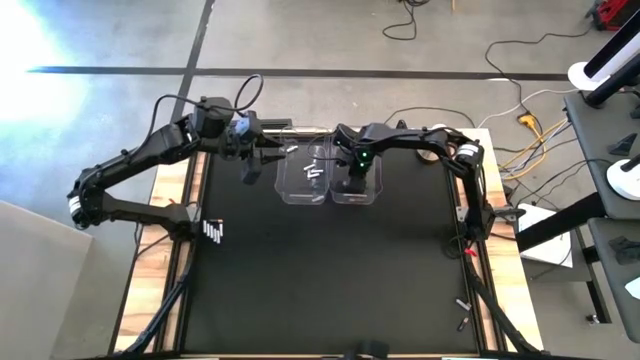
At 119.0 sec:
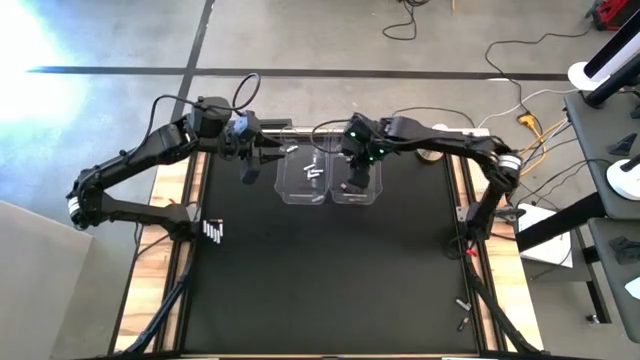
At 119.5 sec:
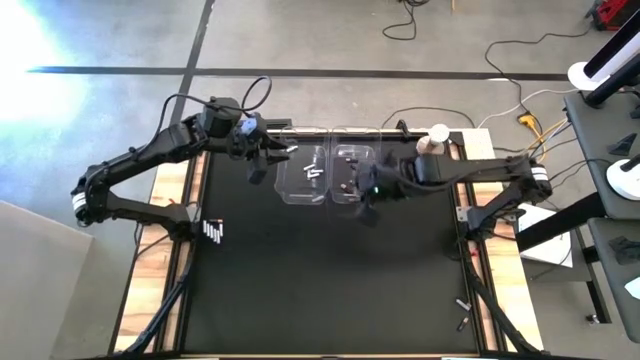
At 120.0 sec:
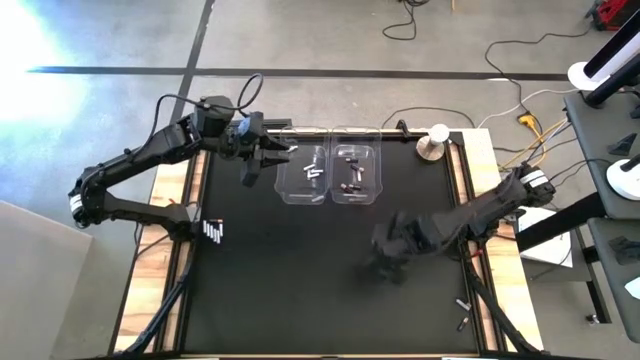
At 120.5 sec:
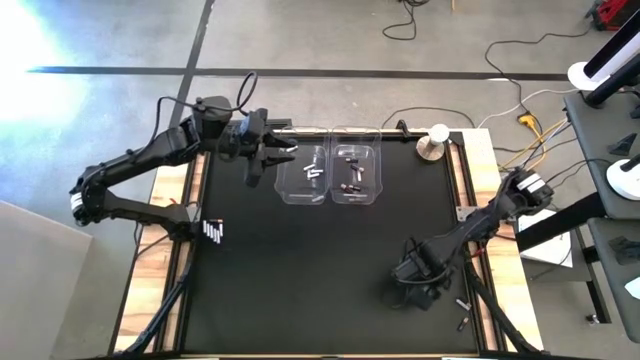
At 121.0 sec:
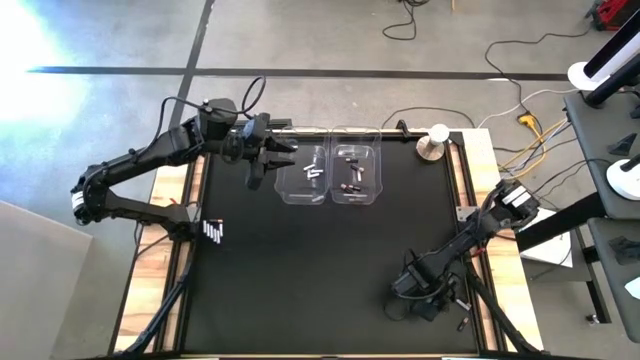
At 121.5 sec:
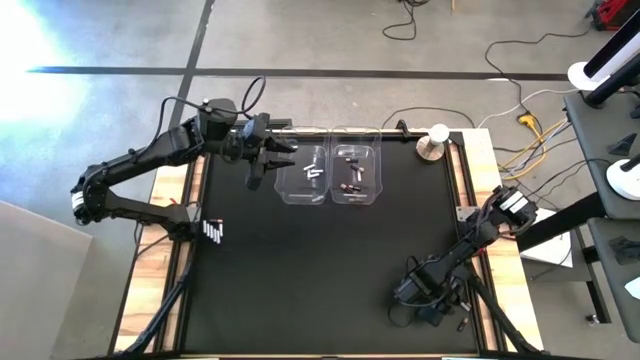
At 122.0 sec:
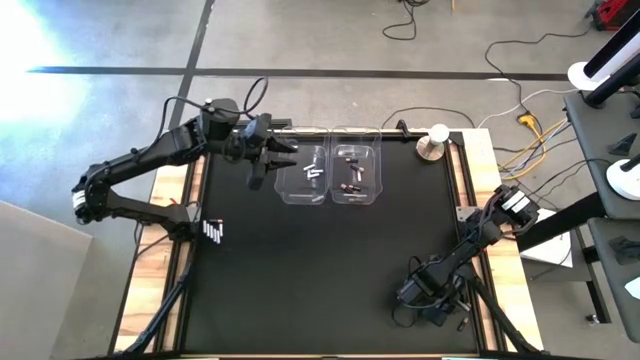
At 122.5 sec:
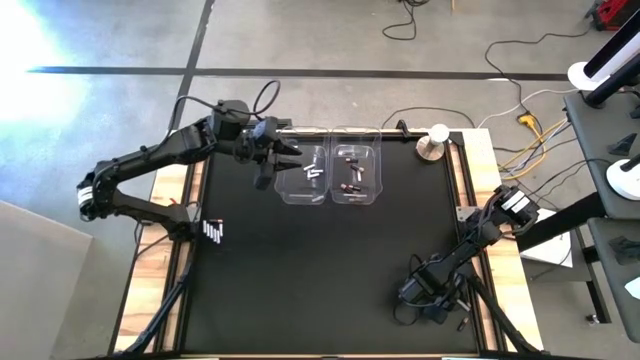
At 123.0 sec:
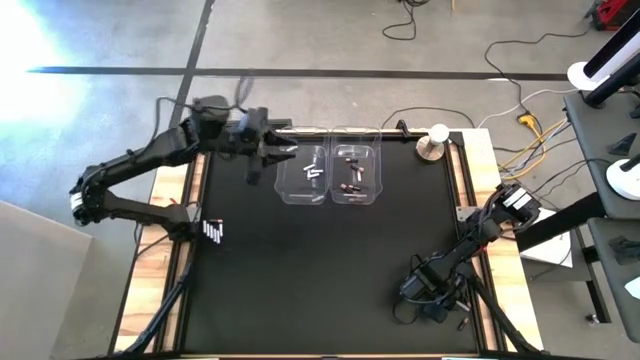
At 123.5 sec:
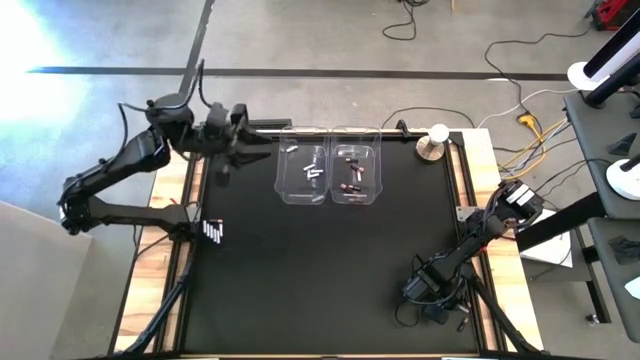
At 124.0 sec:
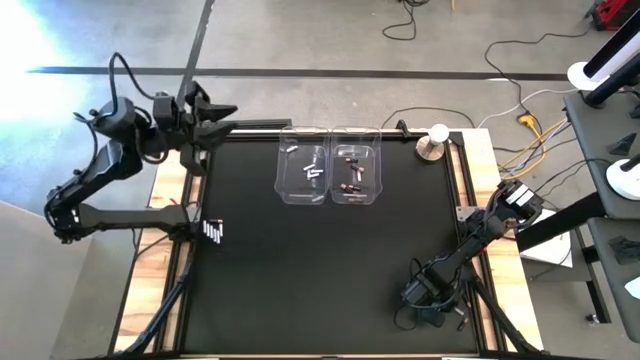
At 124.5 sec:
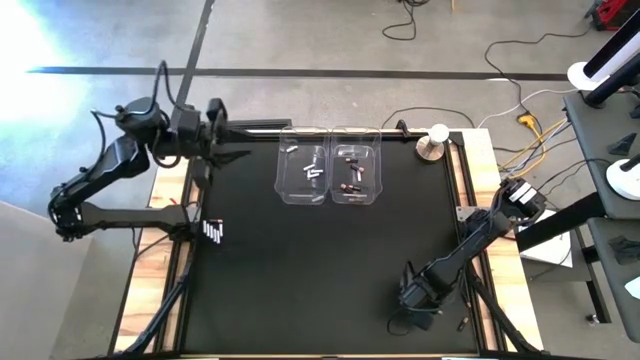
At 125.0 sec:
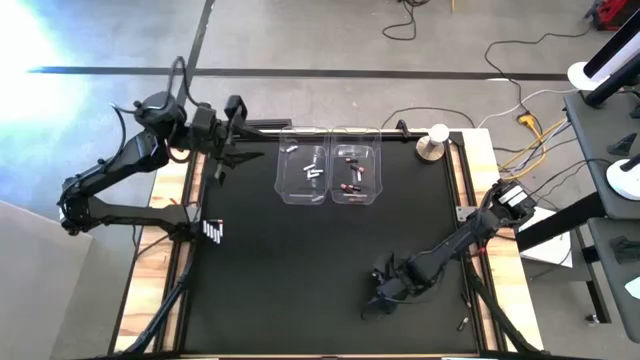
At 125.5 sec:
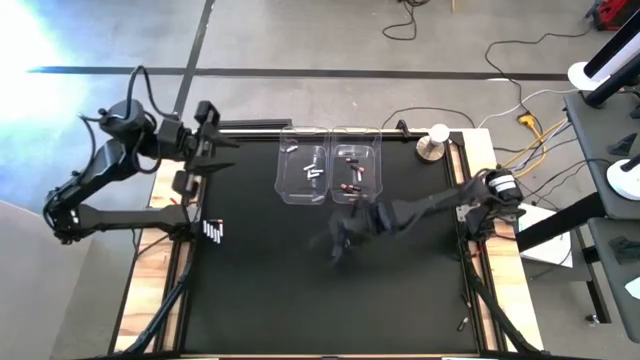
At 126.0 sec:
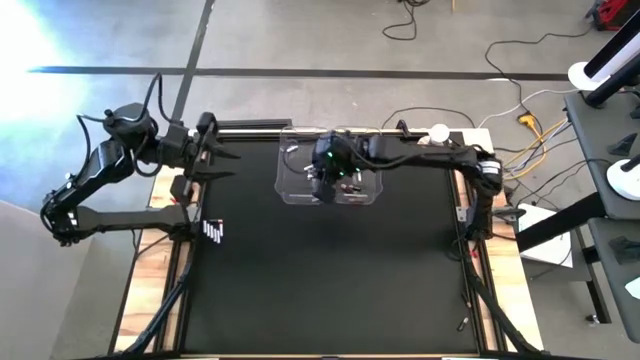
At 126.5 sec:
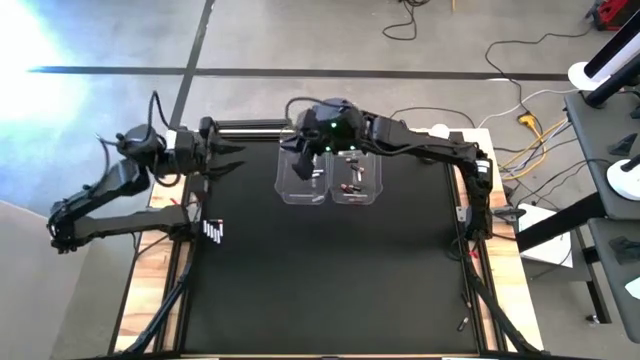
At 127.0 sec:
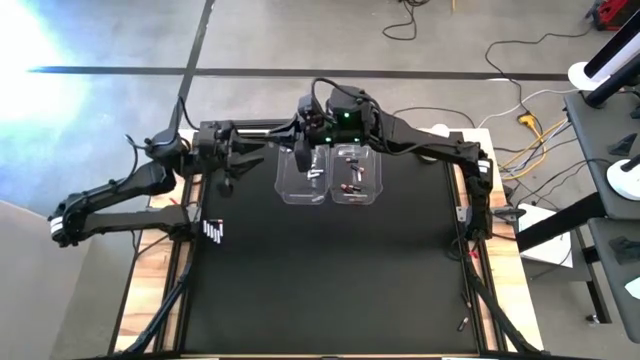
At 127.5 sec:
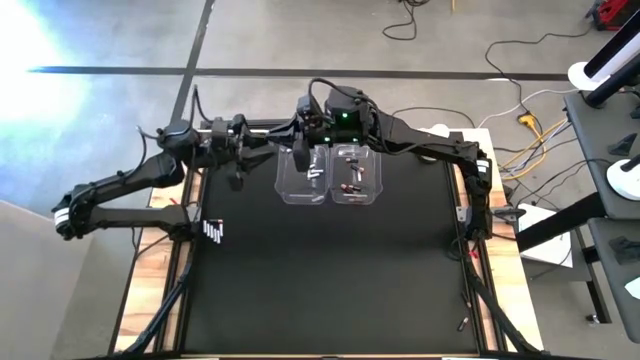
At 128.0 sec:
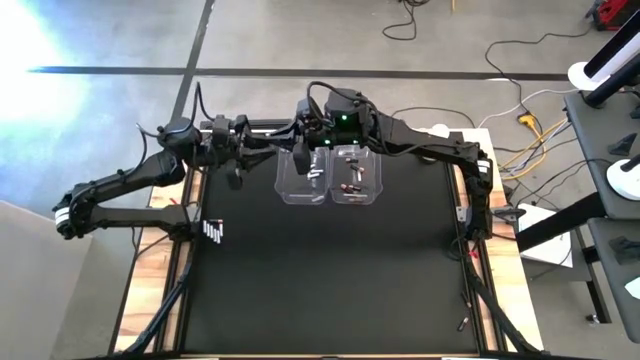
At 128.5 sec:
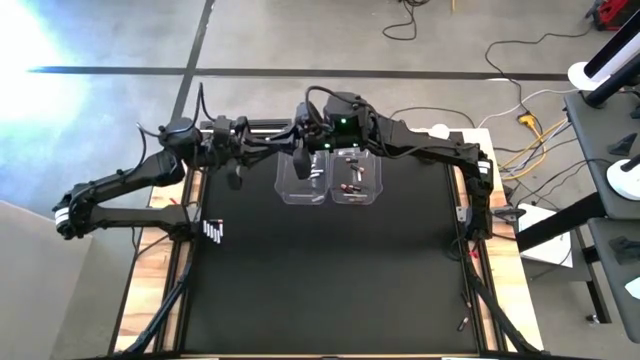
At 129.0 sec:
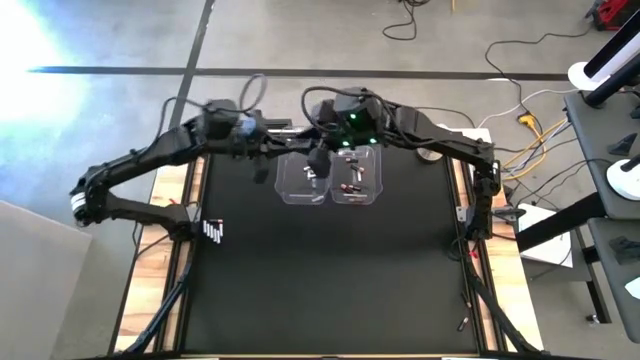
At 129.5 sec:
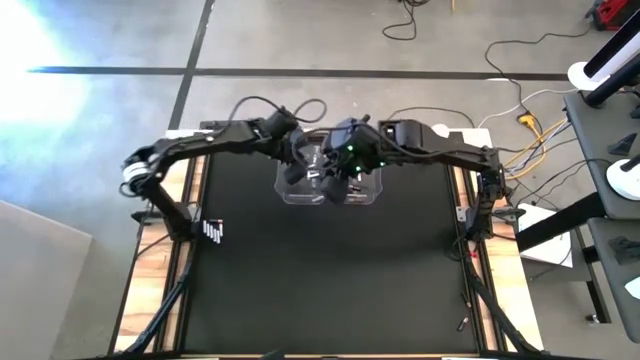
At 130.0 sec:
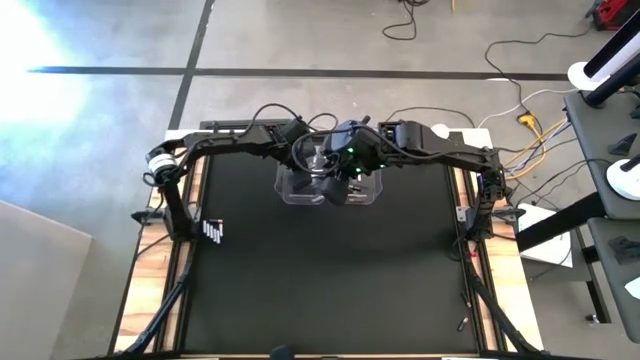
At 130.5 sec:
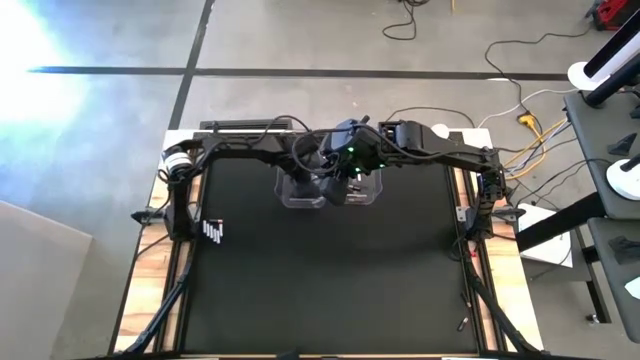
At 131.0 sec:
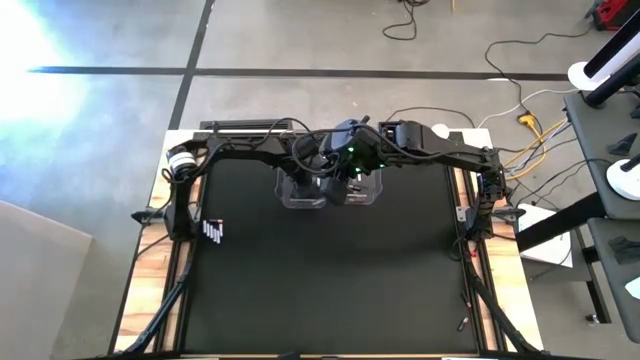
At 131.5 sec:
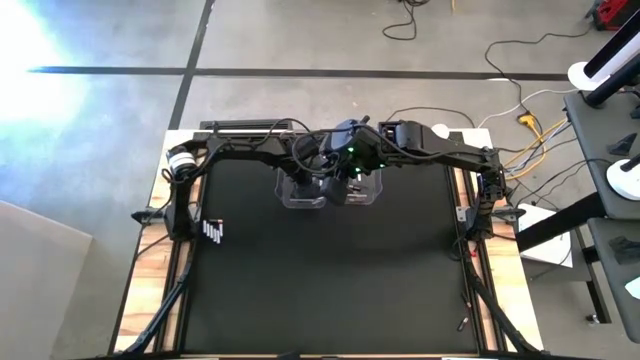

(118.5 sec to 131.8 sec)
Task: Sort batteries
Put the white battery into the left transparent bin

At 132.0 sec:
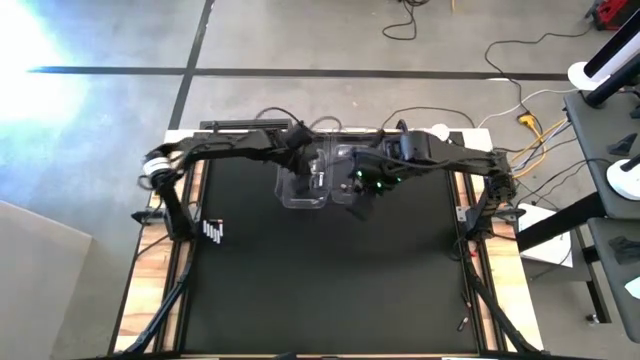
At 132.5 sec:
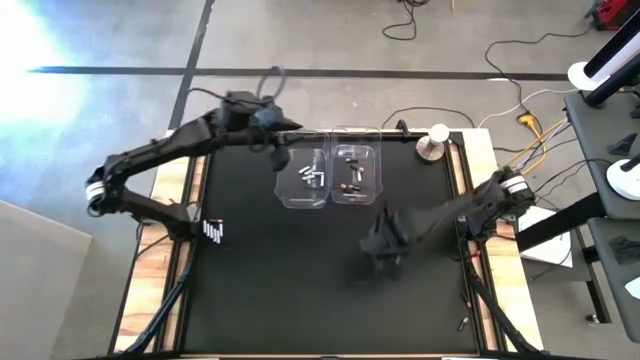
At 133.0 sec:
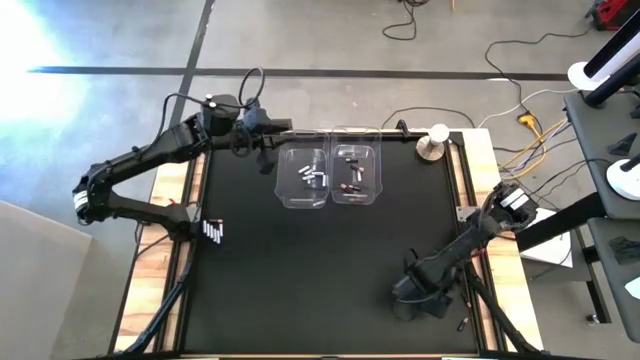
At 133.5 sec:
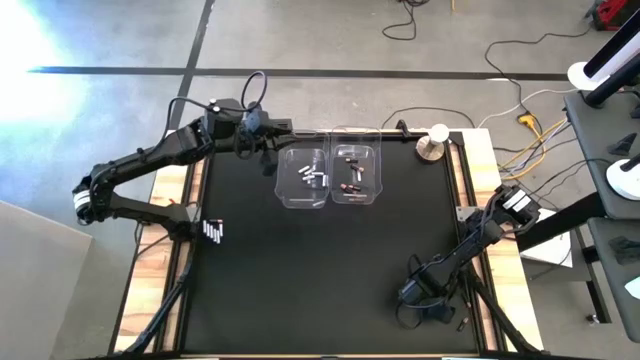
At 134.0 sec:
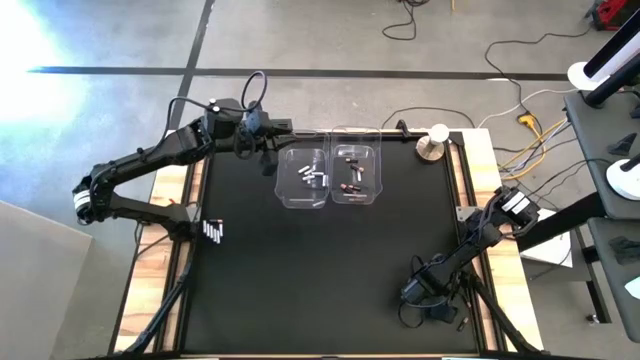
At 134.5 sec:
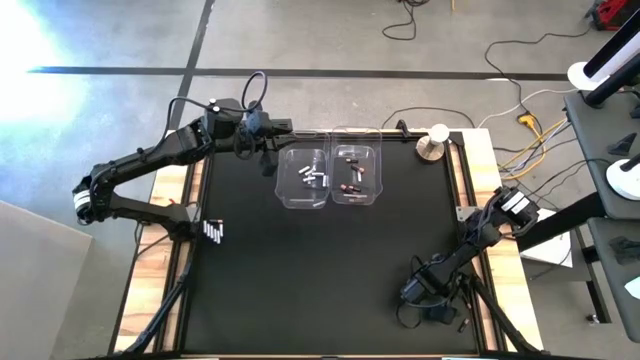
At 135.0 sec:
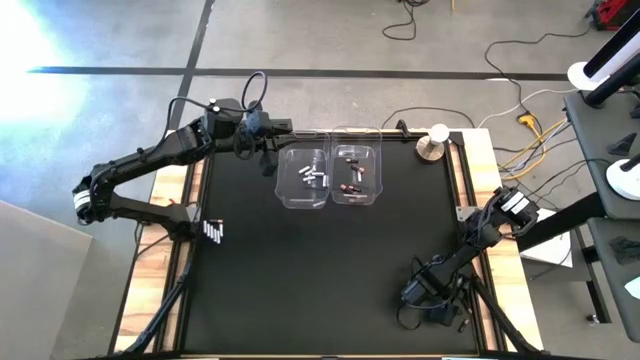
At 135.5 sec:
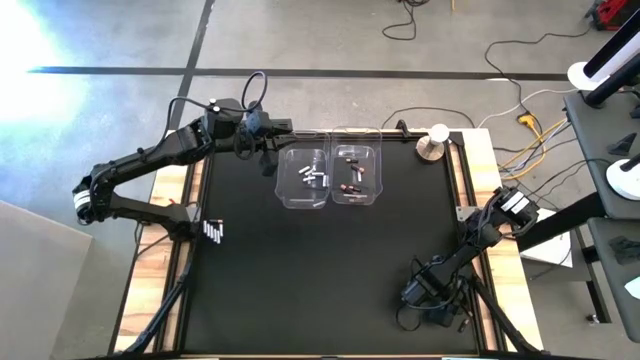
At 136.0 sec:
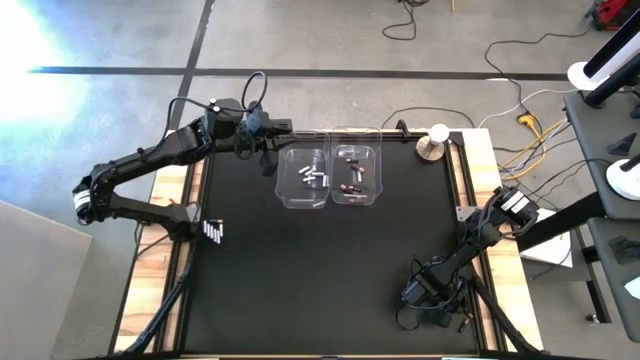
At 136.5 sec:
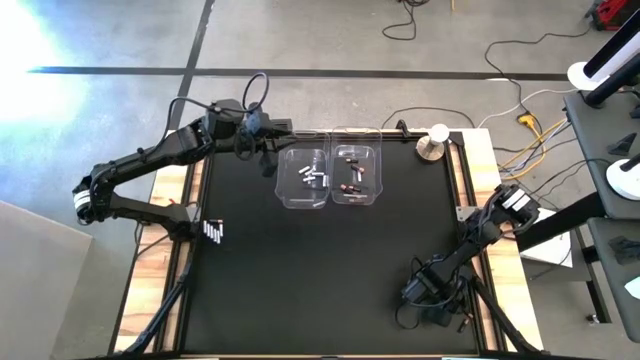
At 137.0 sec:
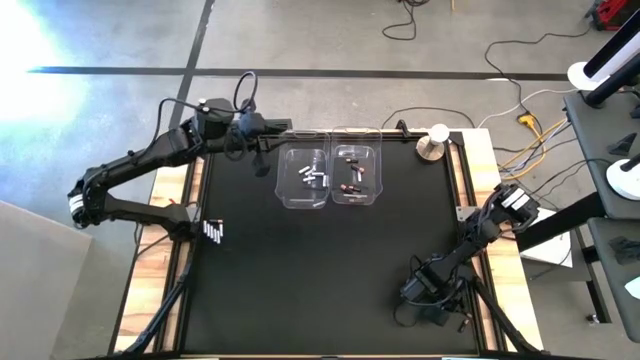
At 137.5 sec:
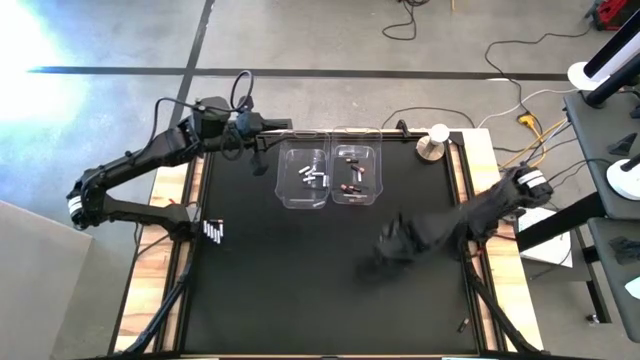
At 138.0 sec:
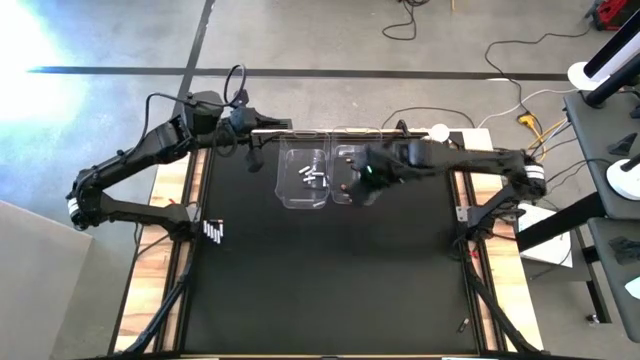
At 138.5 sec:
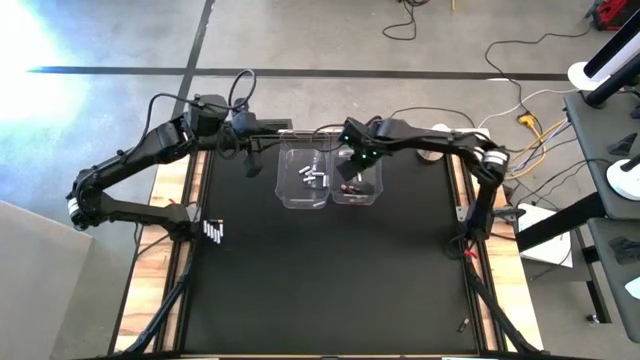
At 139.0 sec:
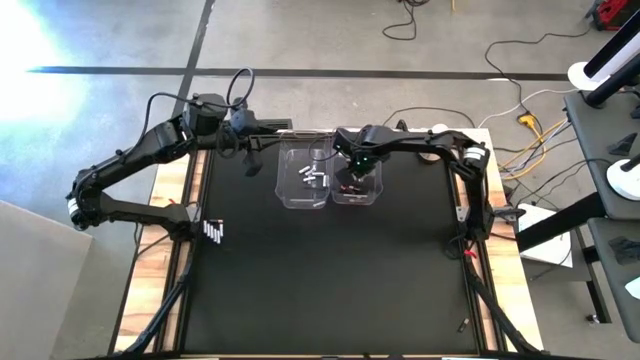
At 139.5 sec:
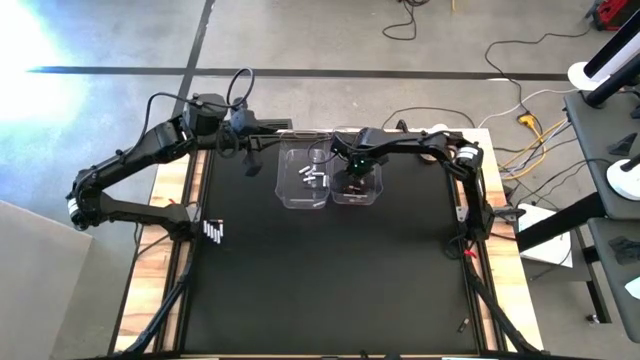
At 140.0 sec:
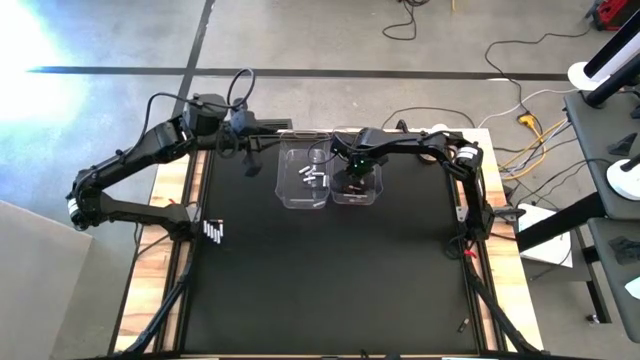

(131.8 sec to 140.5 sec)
Put the black battery into the right transparent bin

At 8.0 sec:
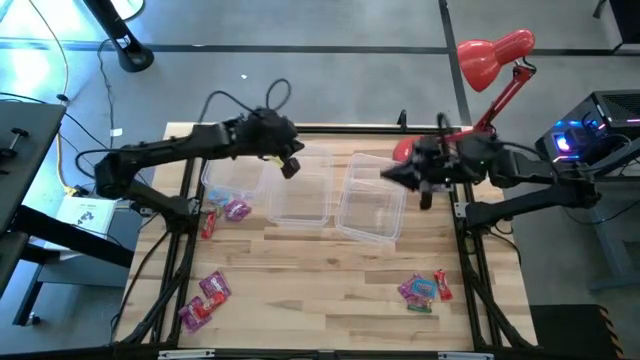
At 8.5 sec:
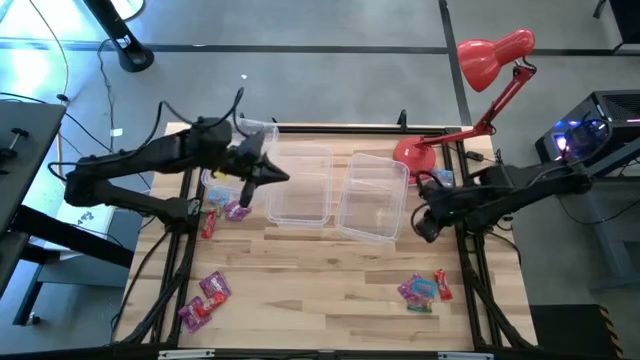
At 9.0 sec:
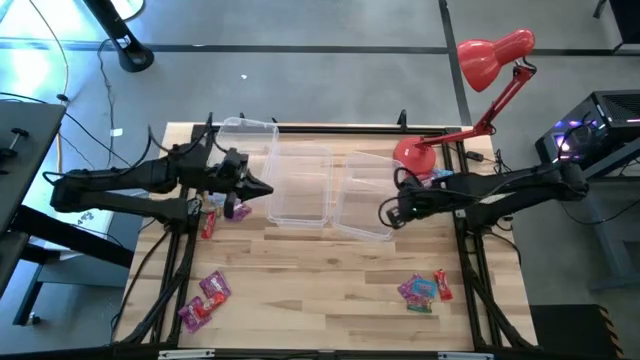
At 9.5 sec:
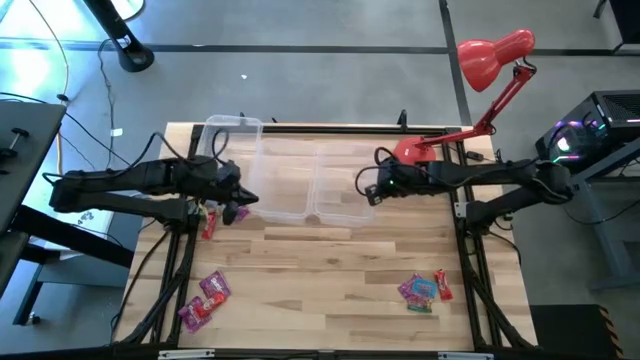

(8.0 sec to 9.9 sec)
Task: Sort candy
Move the right transparent bin to the top center of the table
